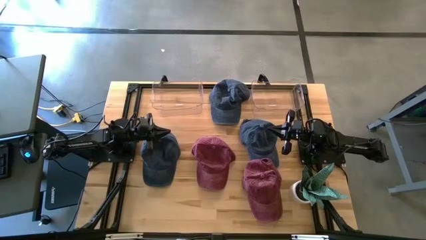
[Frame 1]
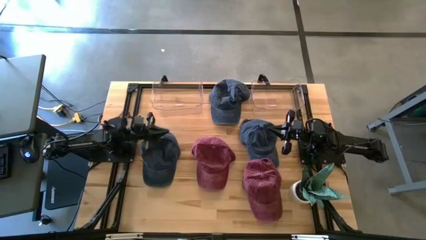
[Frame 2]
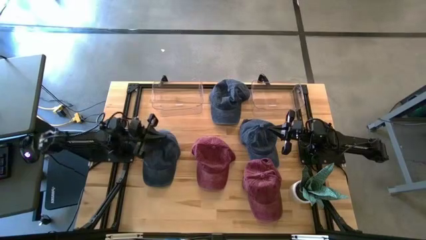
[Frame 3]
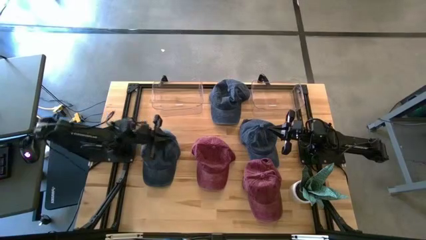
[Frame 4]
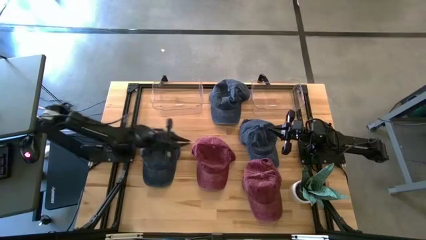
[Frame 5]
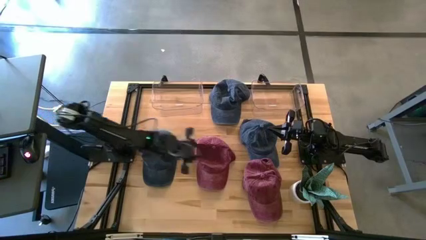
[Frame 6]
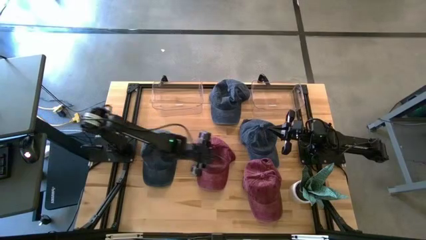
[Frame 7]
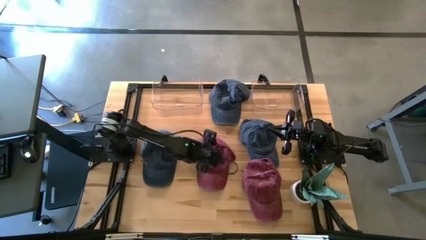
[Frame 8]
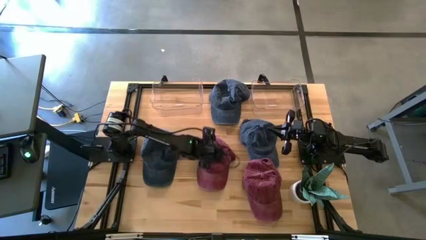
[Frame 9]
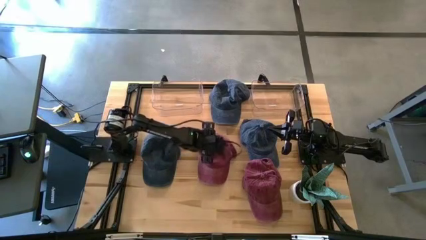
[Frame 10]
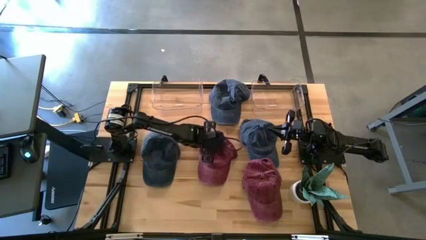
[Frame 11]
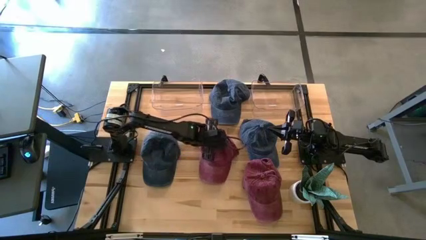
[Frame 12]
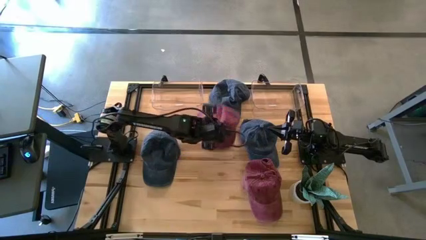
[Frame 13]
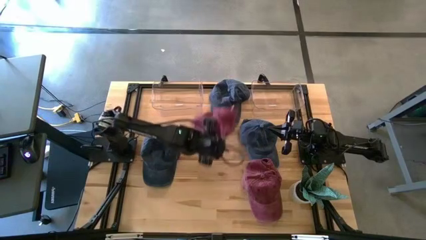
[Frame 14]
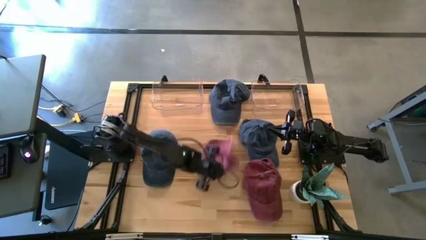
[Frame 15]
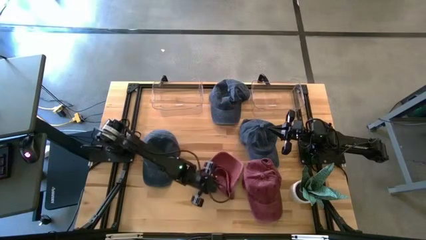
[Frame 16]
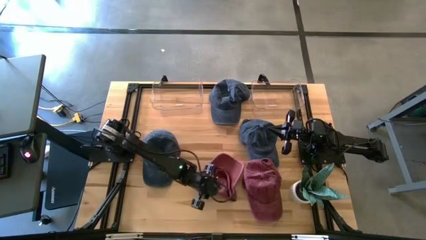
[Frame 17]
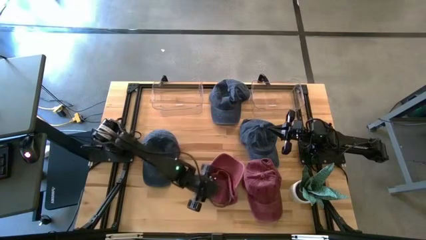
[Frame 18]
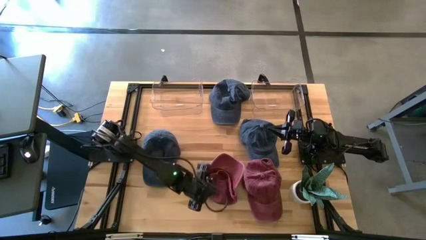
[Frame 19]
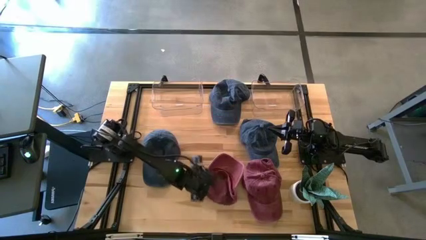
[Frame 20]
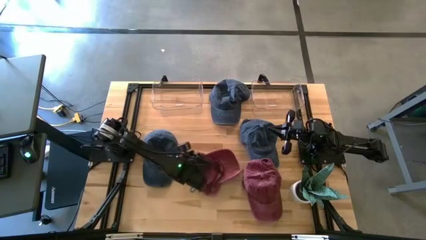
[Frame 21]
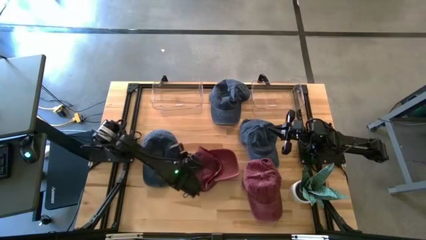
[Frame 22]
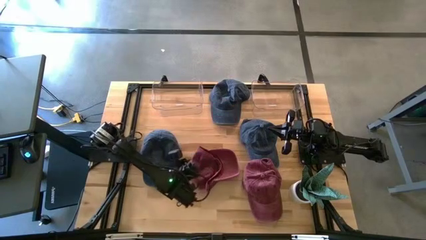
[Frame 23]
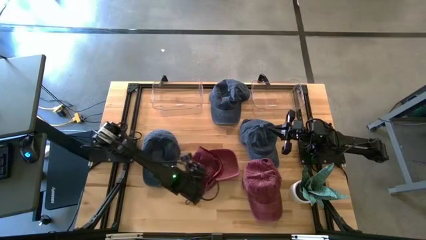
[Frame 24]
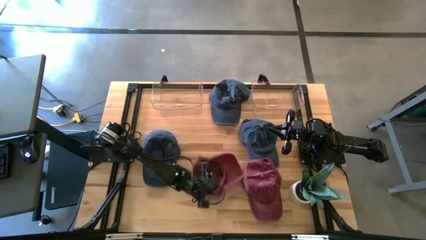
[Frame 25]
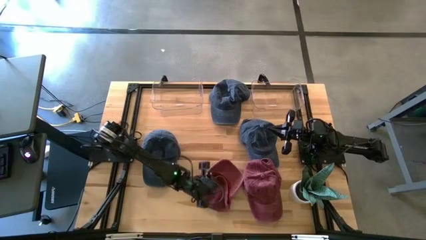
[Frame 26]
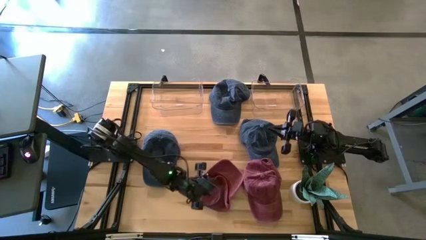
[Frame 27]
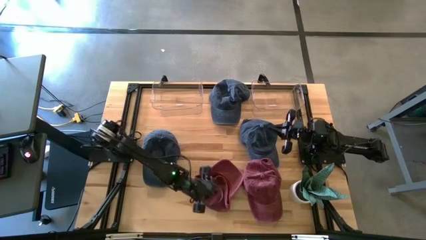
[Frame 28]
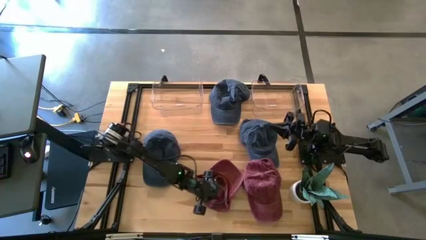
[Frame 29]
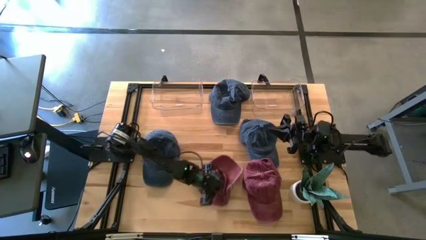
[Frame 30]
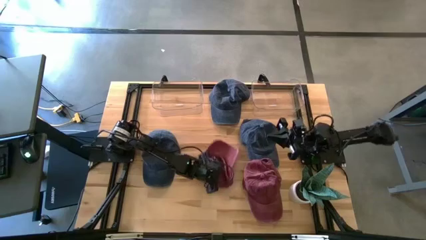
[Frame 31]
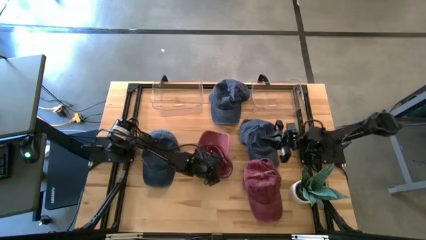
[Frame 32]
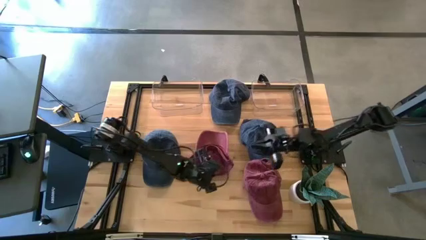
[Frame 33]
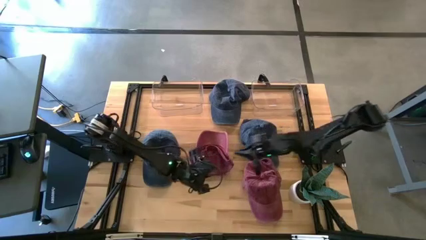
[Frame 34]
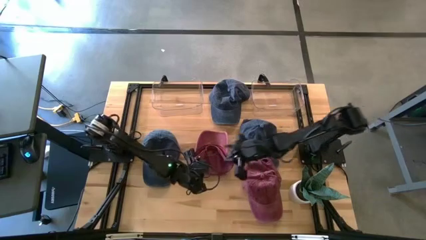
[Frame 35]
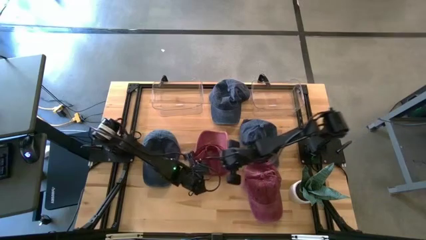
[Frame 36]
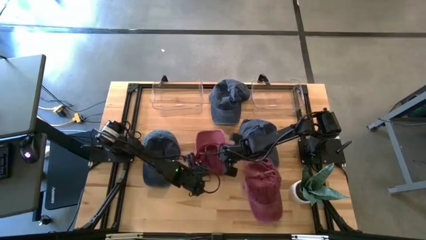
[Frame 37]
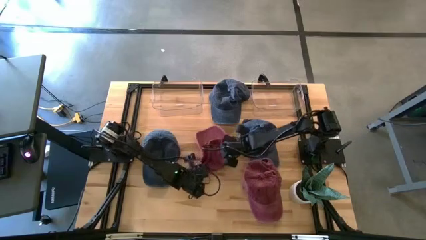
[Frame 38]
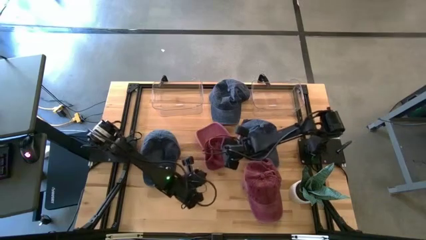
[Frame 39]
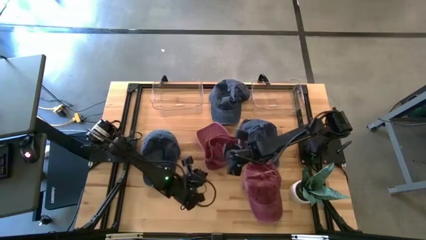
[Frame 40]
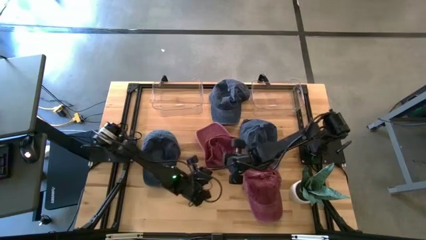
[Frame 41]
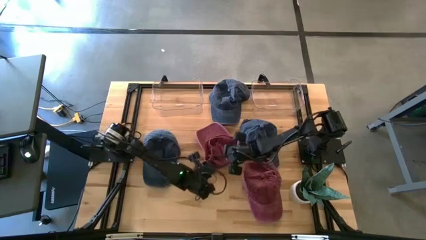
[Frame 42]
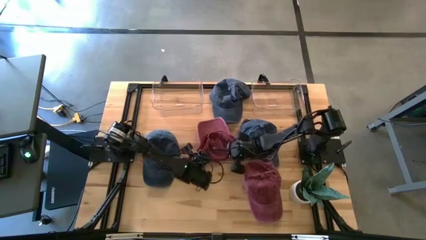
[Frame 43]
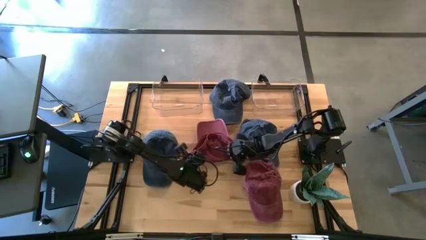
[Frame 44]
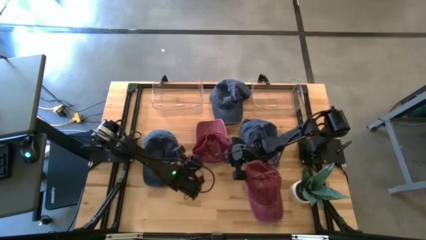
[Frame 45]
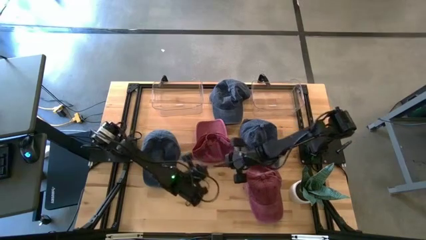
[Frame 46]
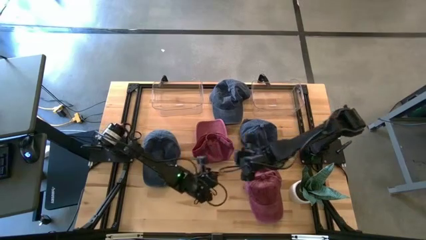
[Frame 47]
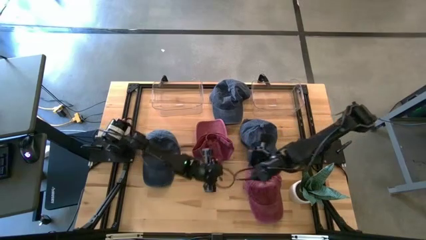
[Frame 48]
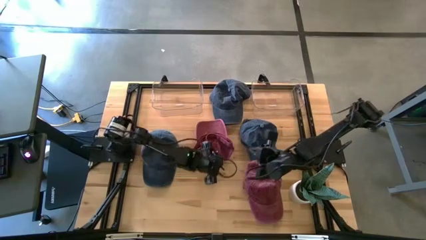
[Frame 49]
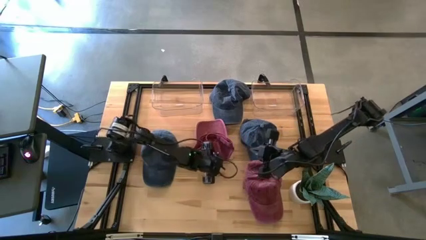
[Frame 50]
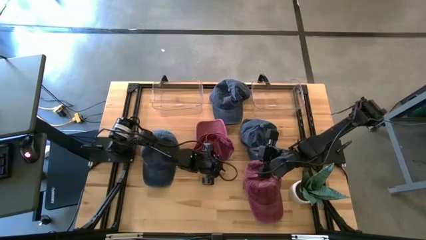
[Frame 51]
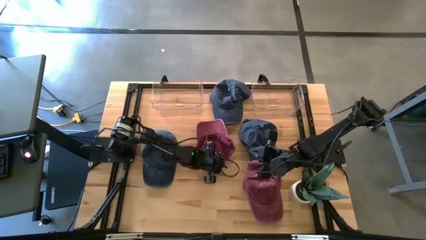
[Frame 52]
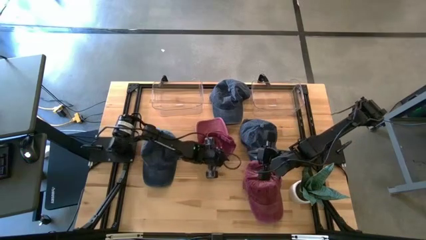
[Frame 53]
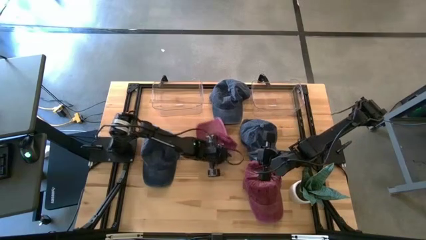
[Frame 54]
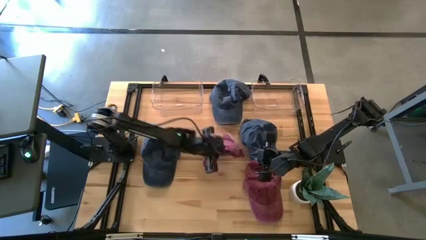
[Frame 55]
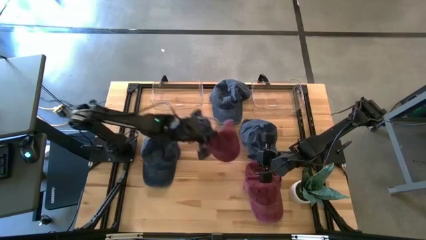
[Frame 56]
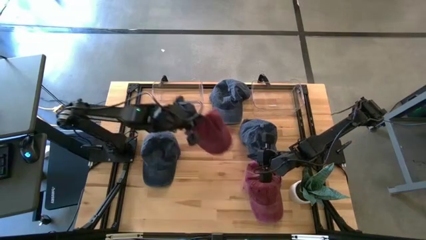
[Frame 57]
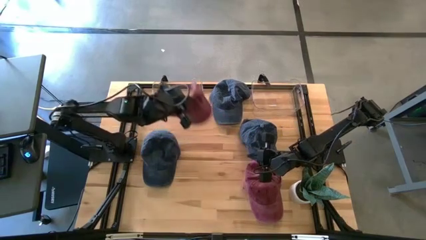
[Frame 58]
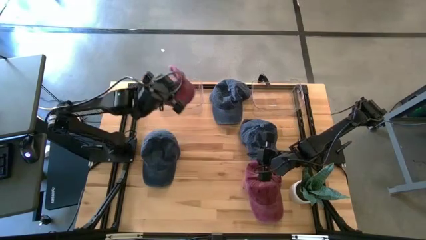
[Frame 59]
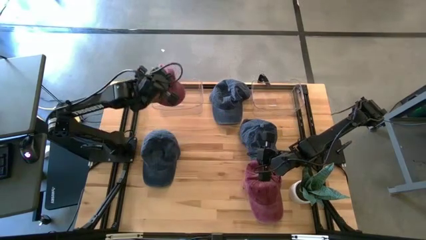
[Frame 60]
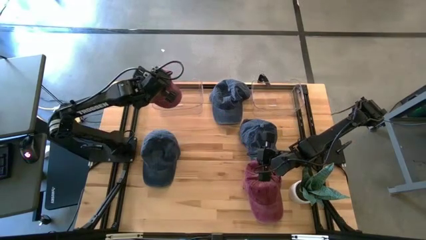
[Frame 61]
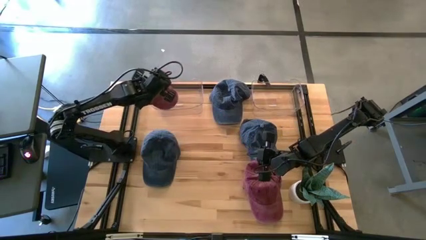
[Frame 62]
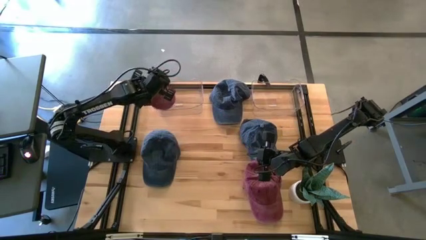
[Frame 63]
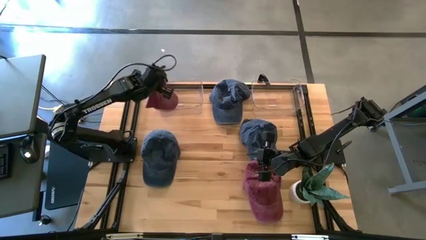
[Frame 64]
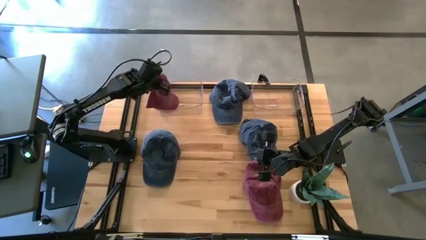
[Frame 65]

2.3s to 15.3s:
Task: Pick & Place hat
Put the left red cap into the left transparent bin
